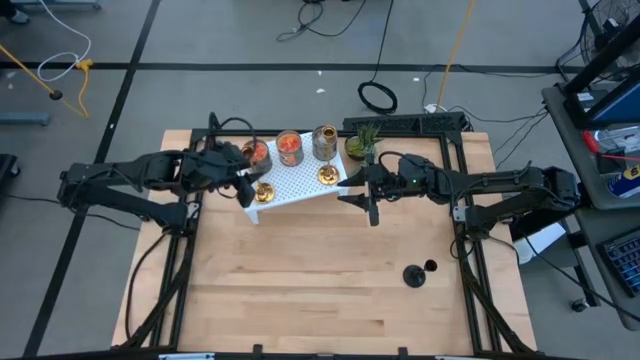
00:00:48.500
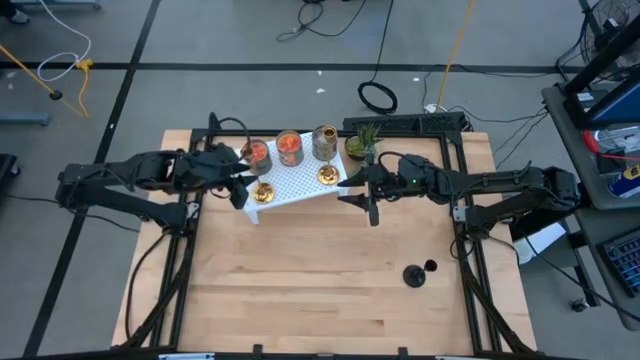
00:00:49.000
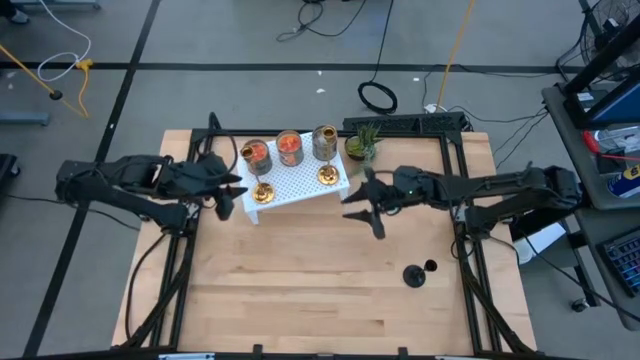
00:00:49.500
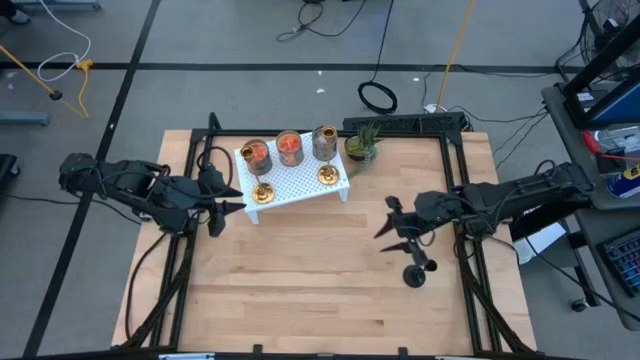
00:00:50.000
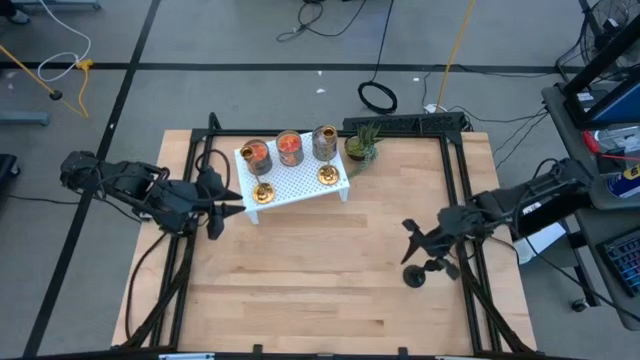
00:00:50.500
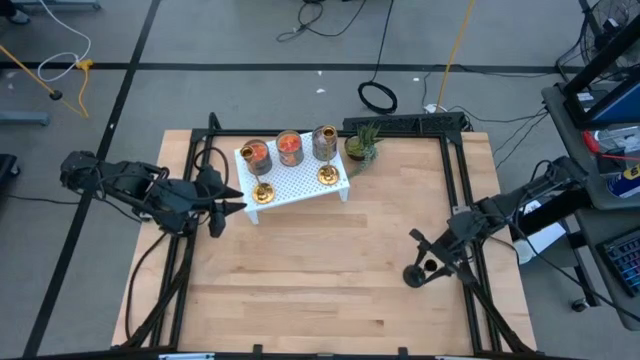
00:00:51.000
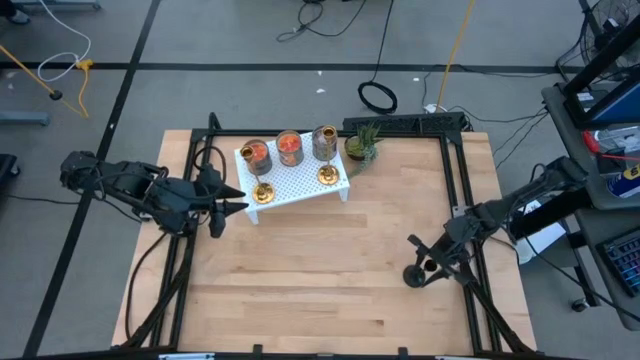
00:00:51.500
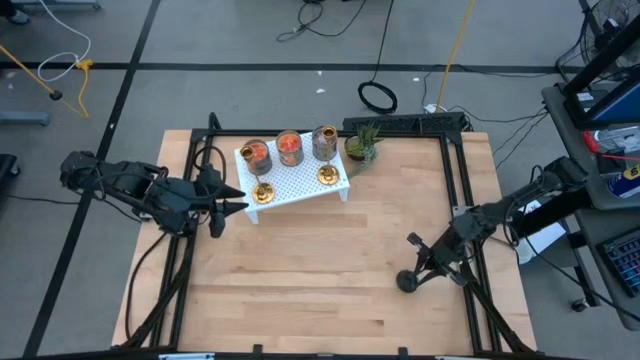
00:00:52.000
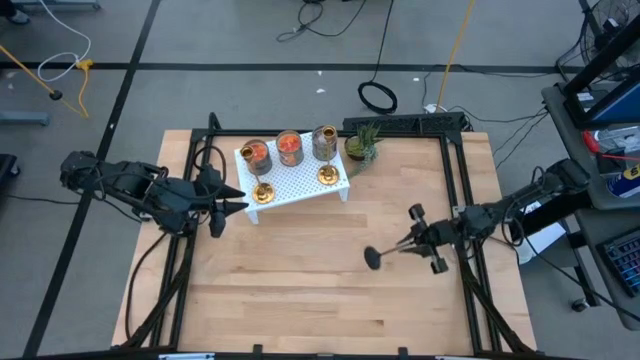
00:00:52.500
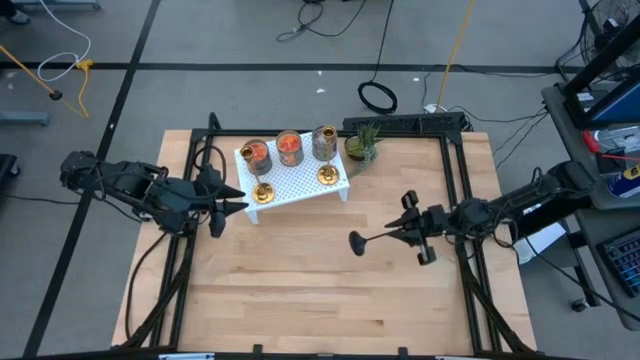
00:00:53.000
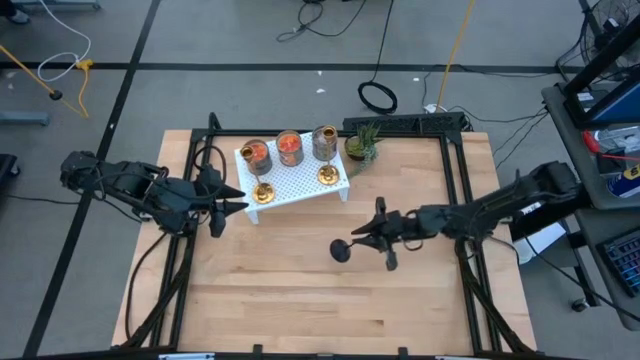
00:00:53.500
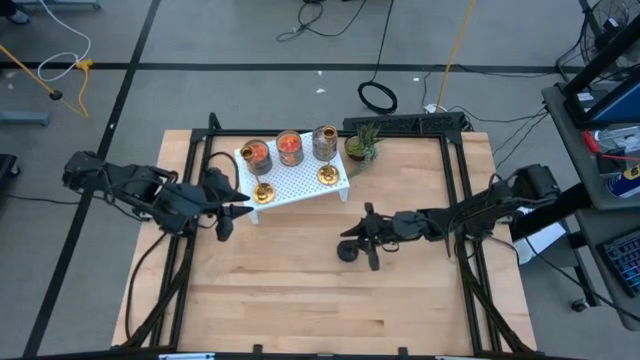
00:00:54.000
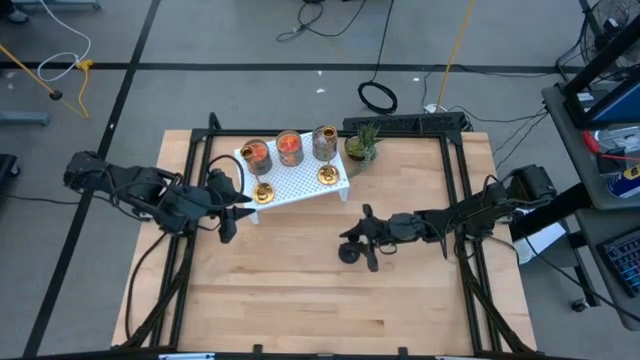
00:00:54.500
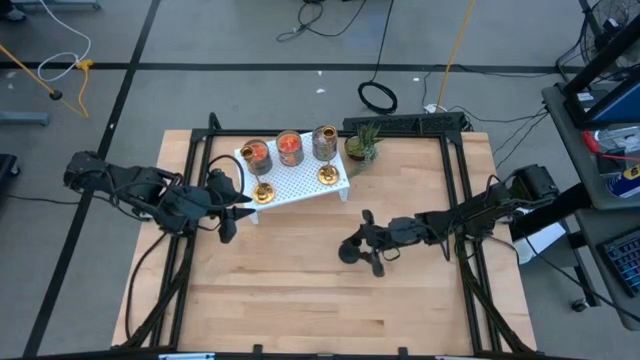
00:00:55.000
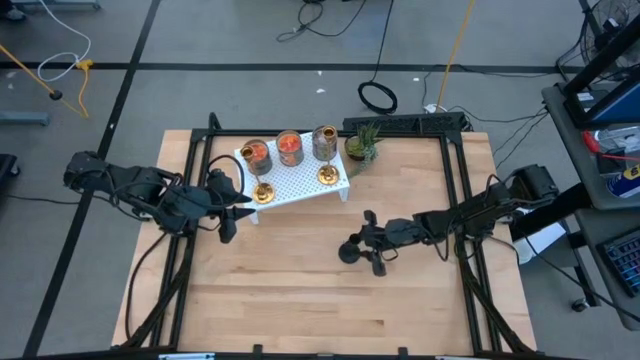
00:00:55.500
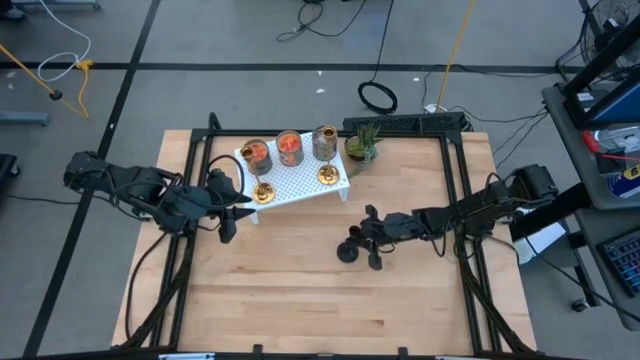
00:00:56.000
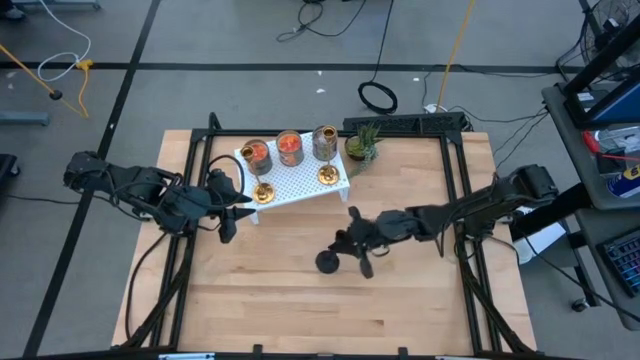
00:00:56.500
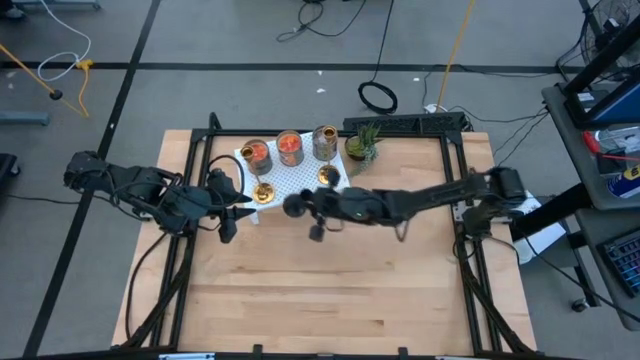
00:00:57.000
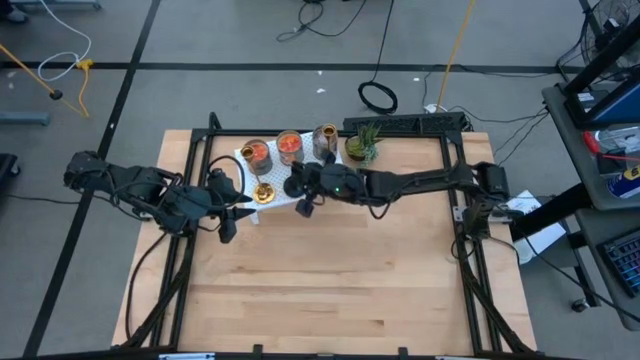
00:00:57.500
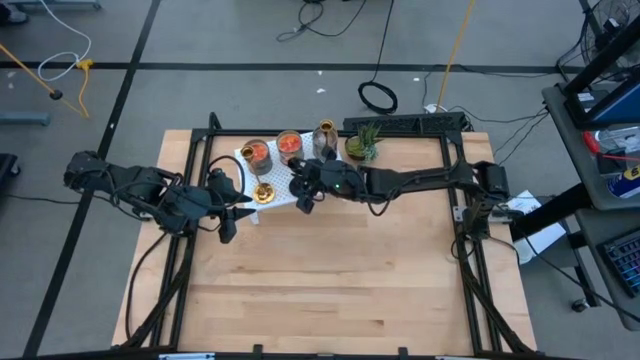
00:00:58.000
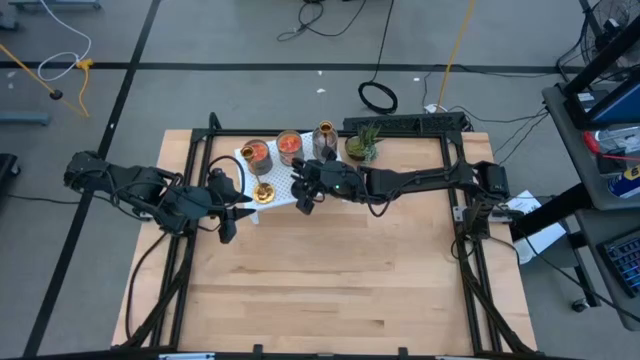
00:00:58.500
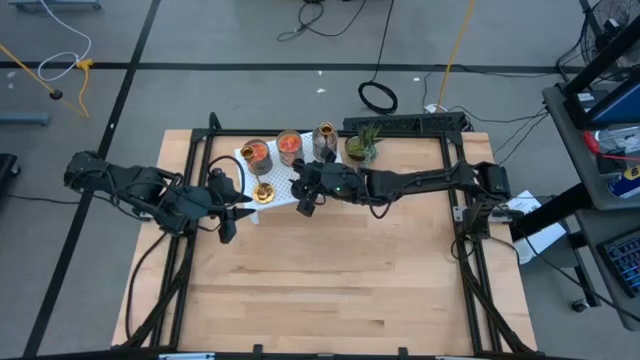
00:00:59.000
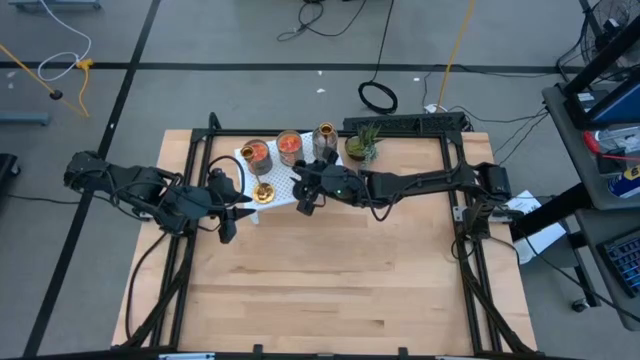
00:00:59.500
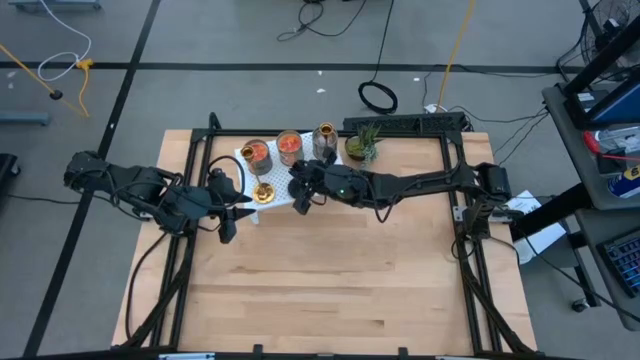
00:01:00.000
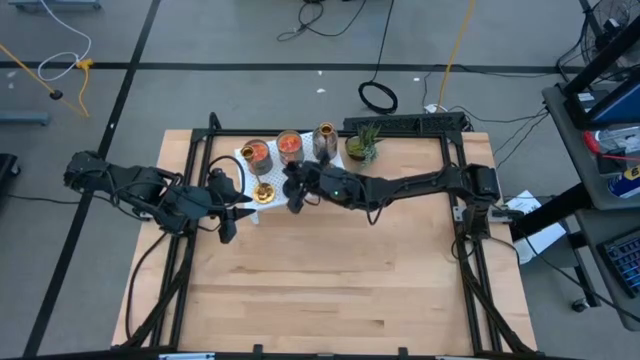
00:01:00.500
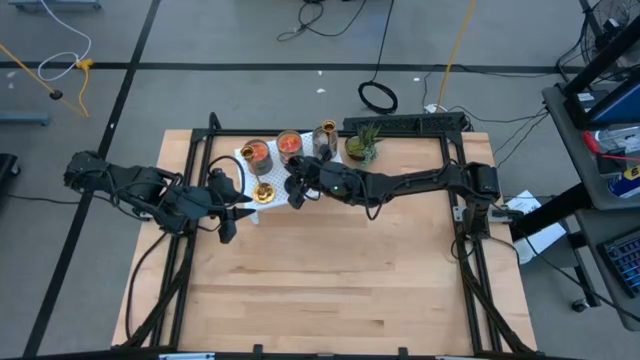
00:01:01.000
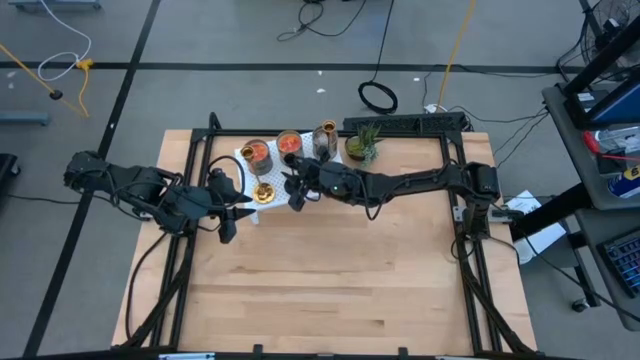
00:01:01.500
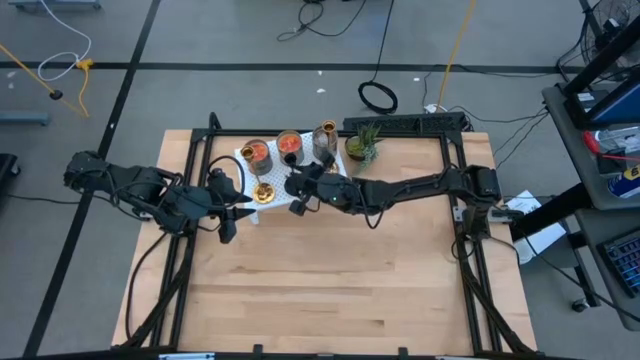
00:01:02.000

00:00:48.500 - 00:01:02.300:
Task: Pick & Place candle stick holders
Put the black candle holder on the shelf

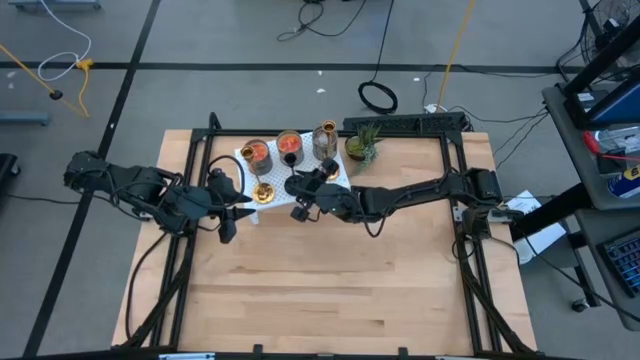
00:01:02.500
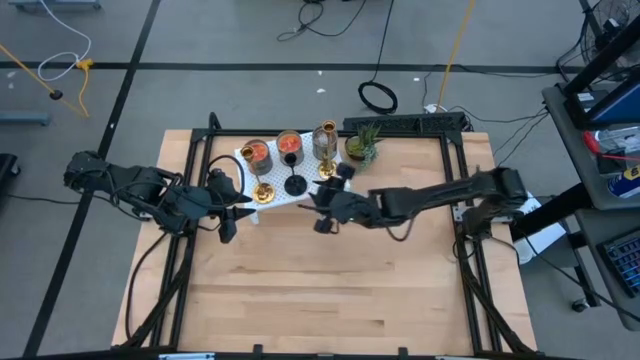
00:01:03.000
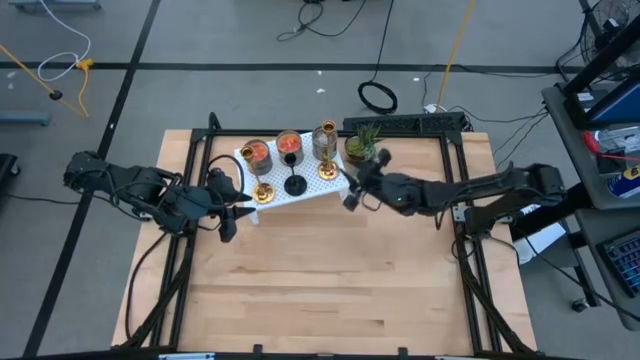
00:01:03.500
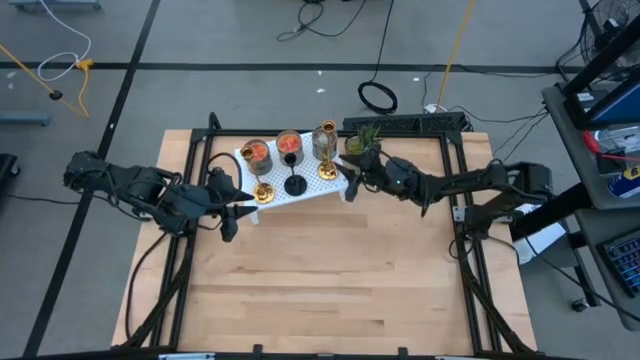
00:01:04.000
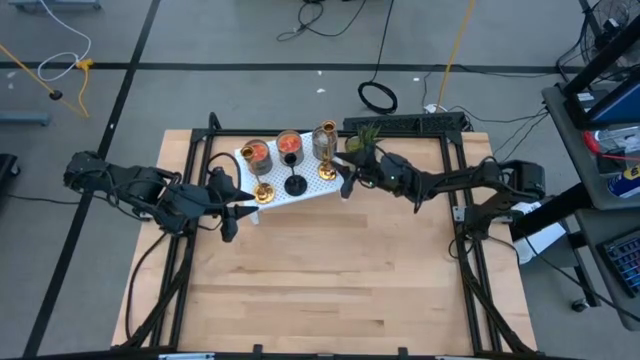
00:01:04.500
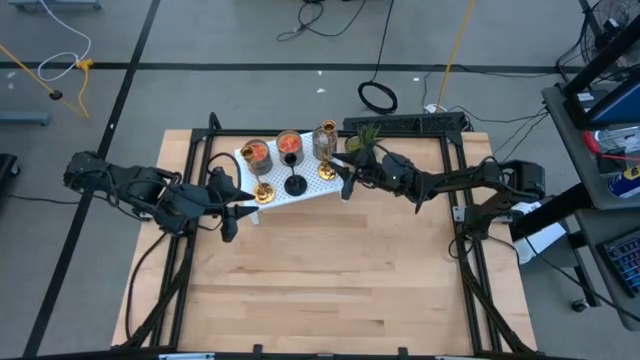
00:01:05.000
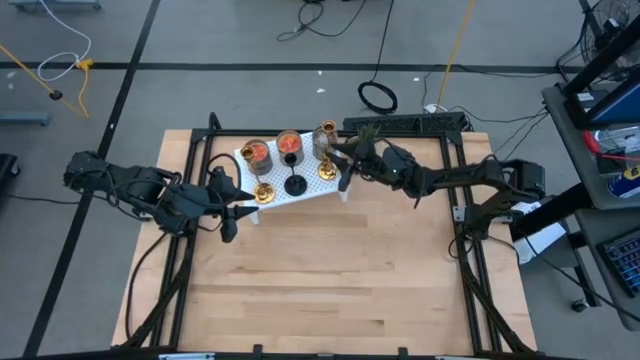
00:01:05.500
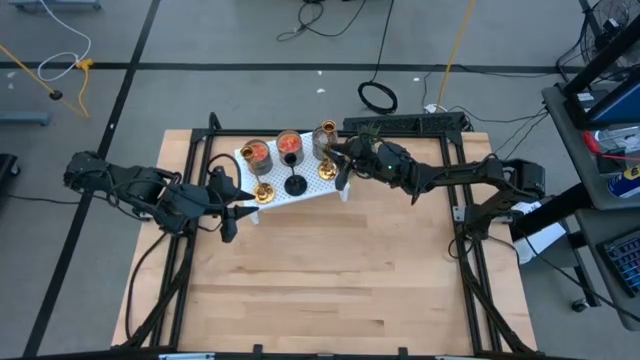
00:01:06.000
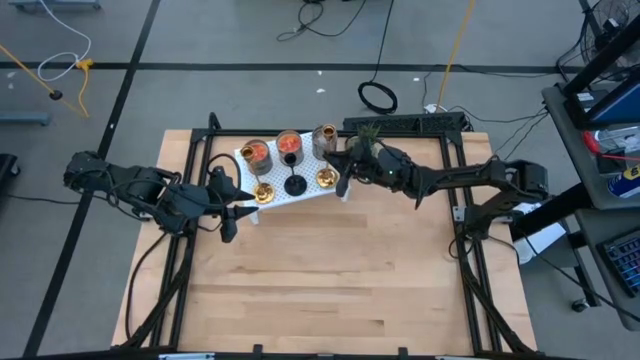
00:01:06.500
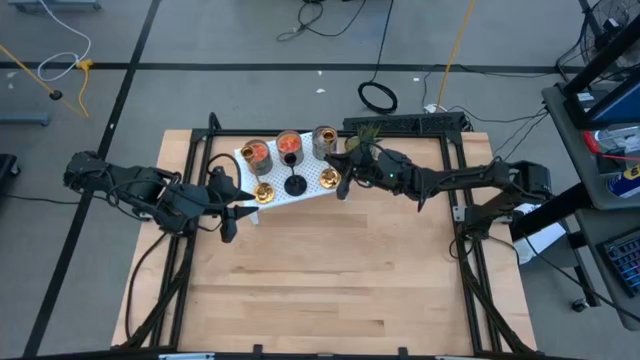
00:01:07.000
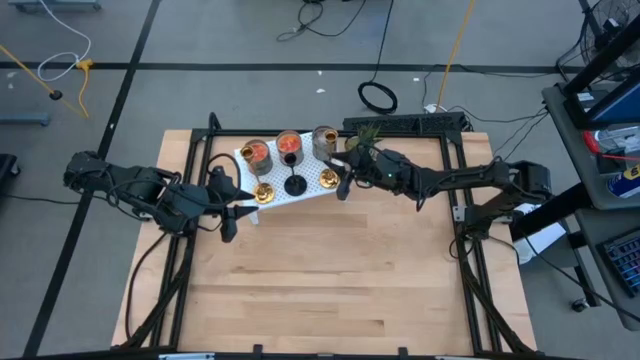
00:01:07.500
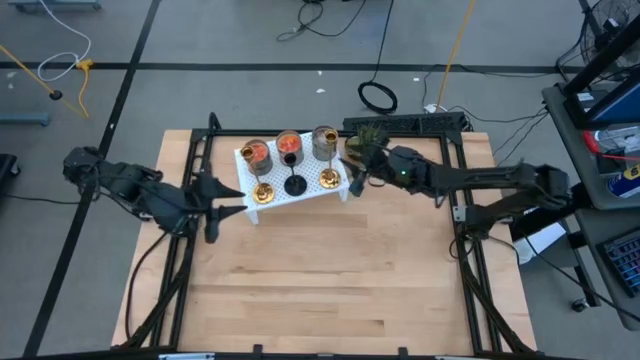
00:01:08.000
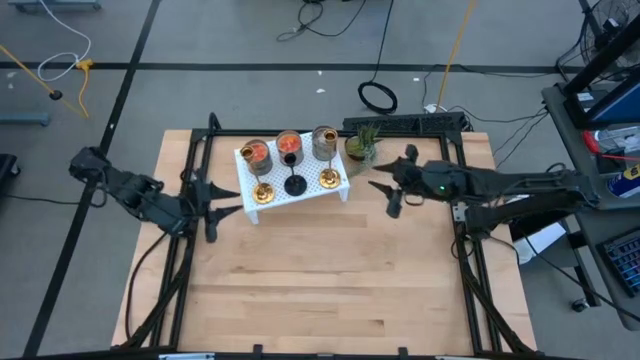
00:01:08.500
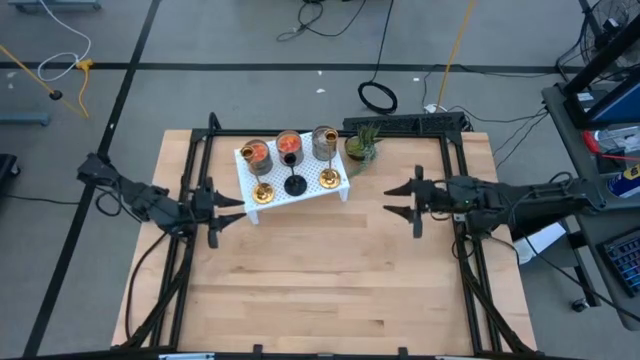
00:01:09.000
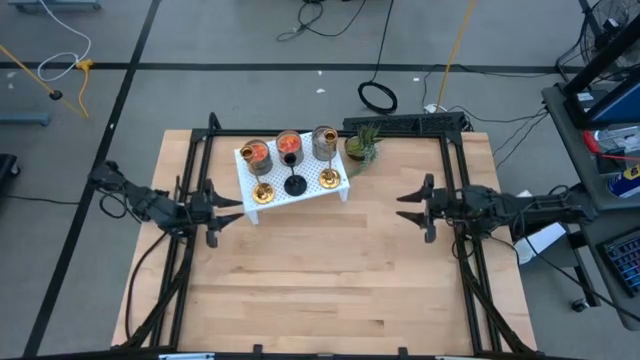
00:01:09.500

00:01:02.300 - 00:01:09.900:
Adjust the gold candle holder on the shelf
